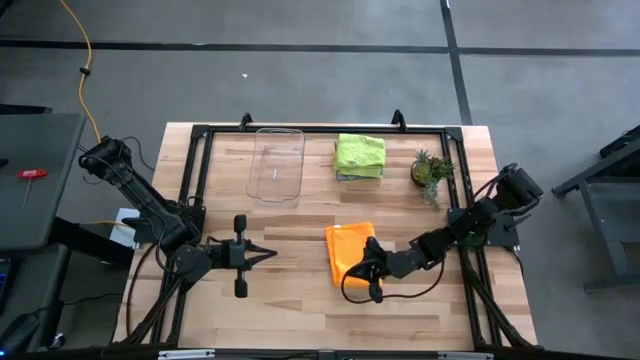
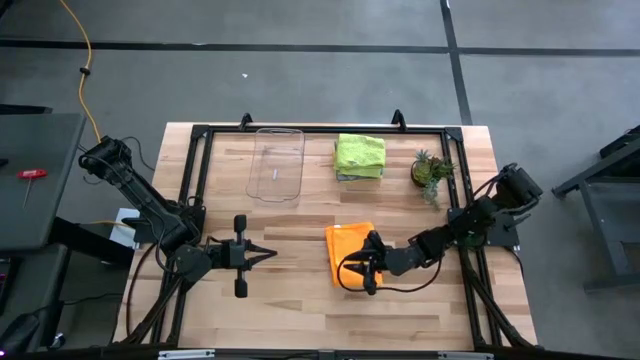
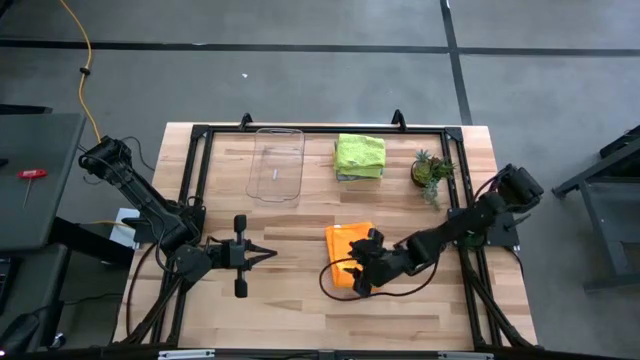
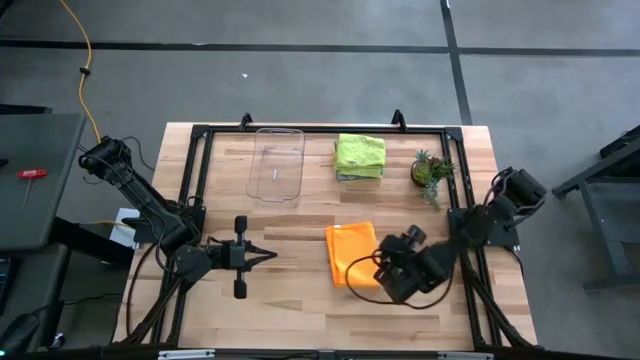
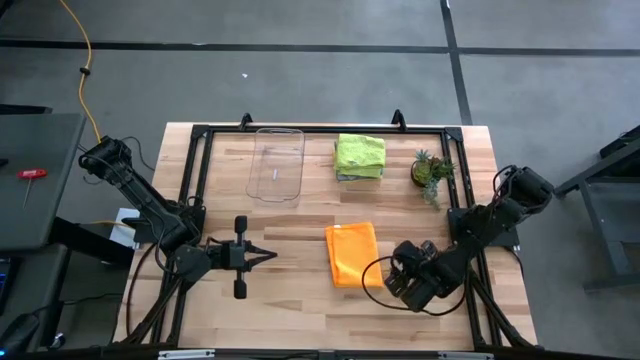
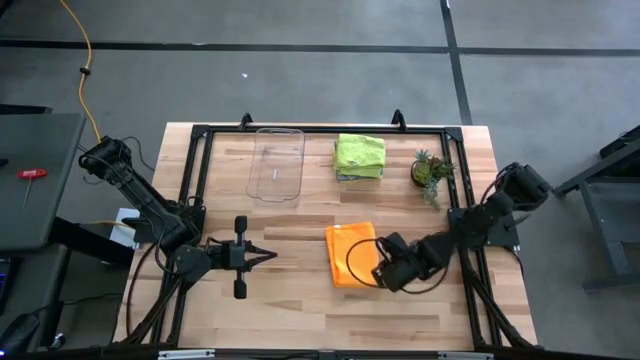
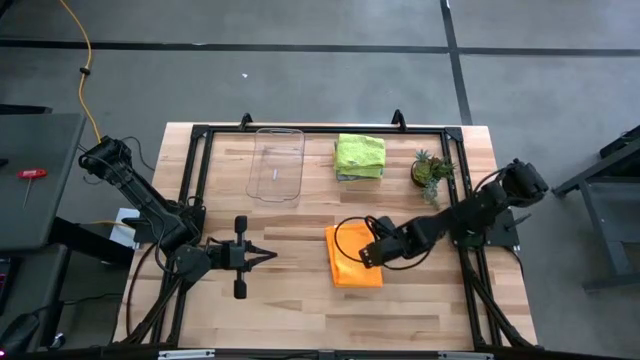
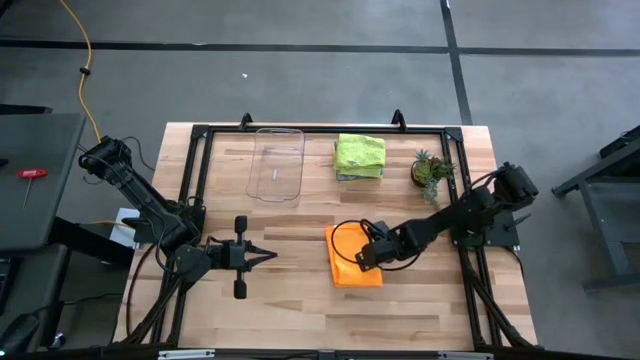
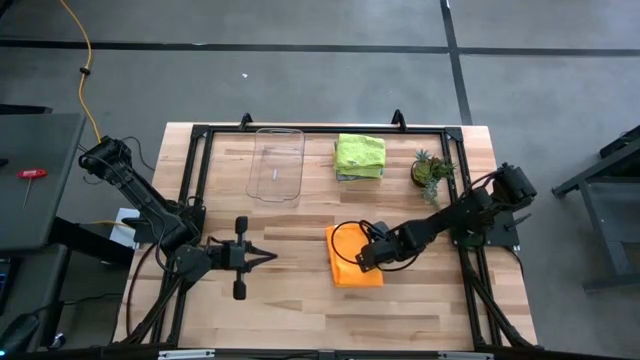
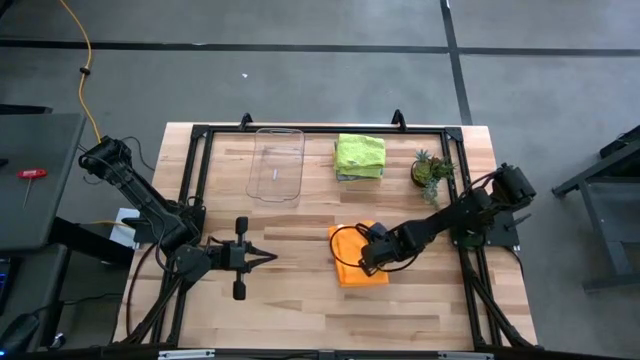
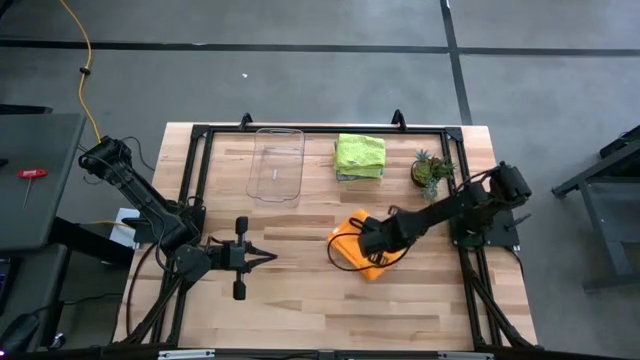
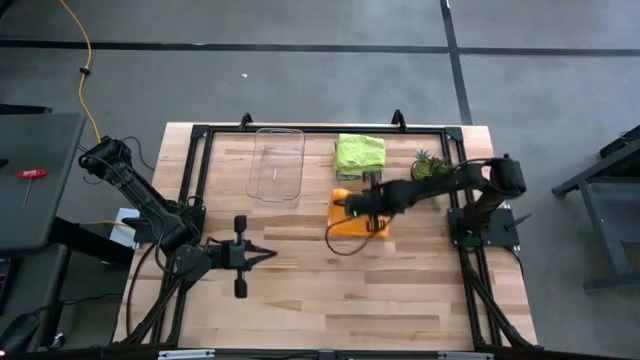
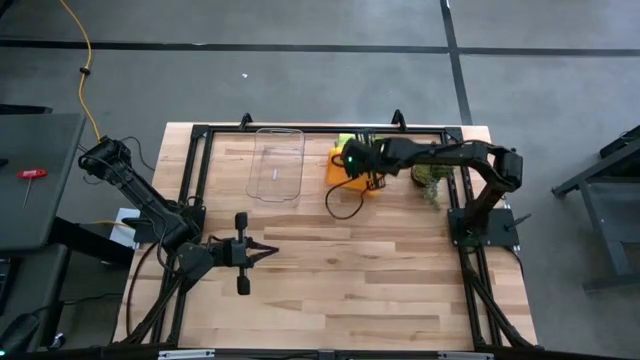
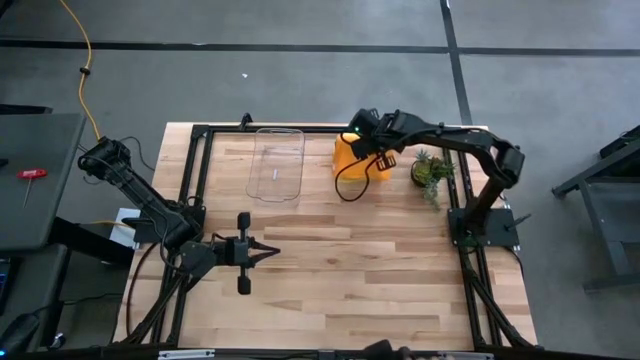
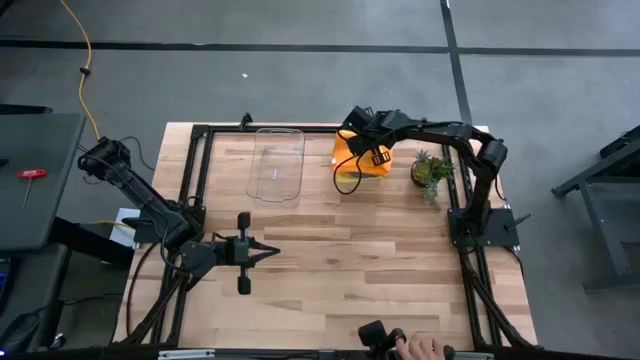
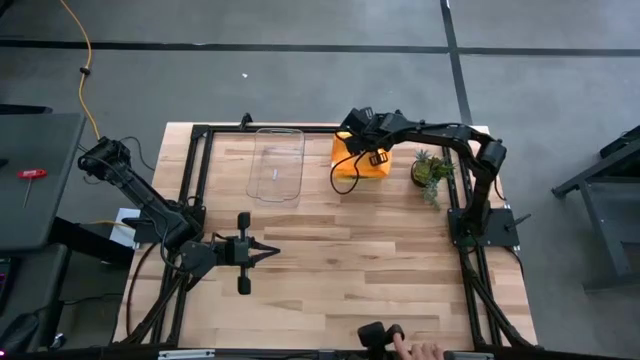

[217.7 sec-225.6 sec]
Task: Fold microfiber towels
Stack the orange microfiber cloth on the green microfiber cloth

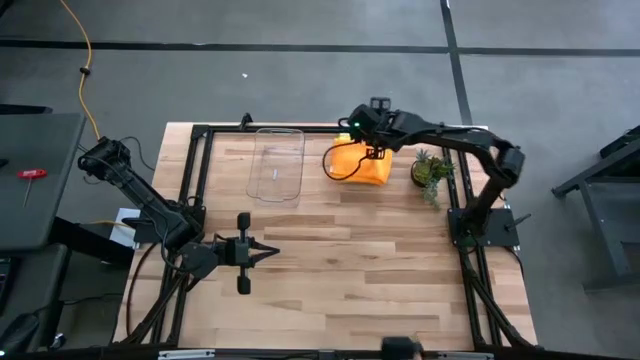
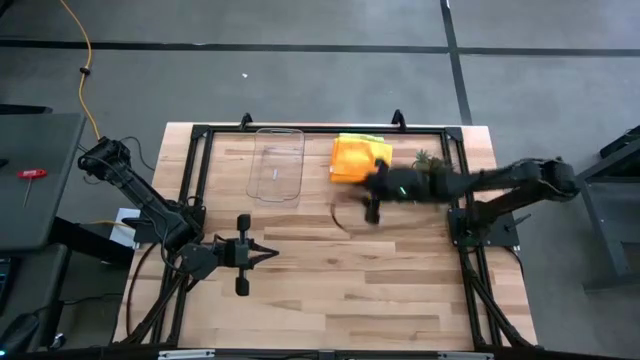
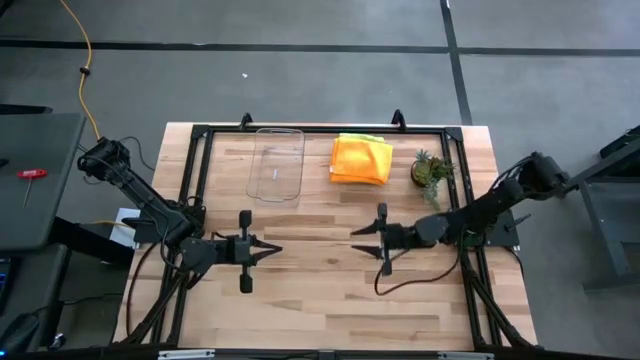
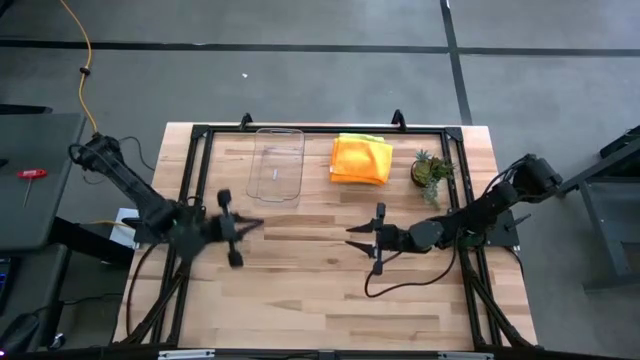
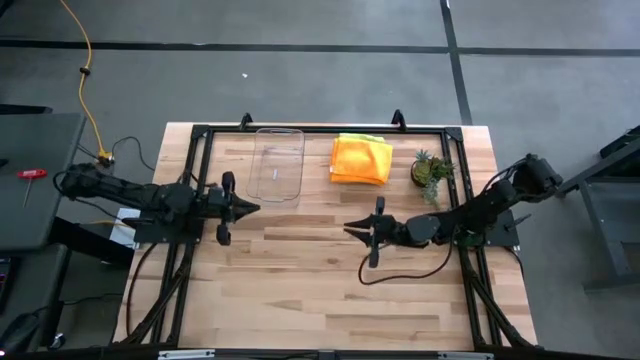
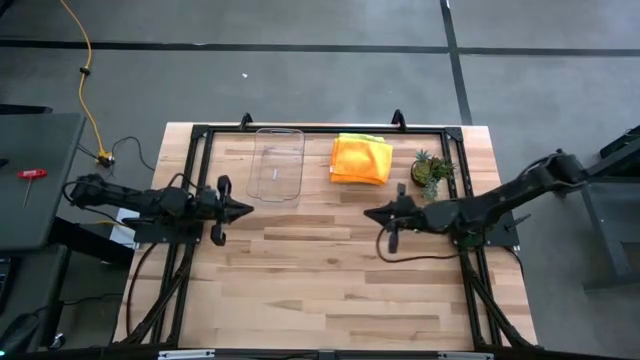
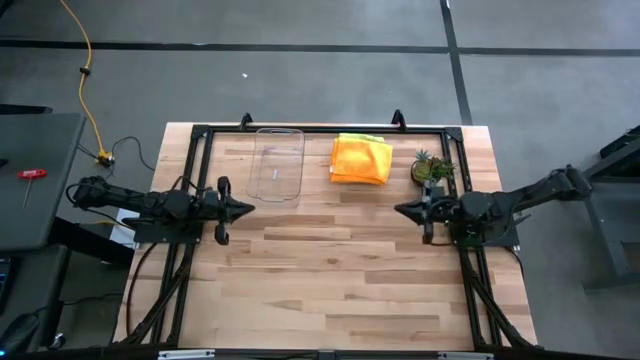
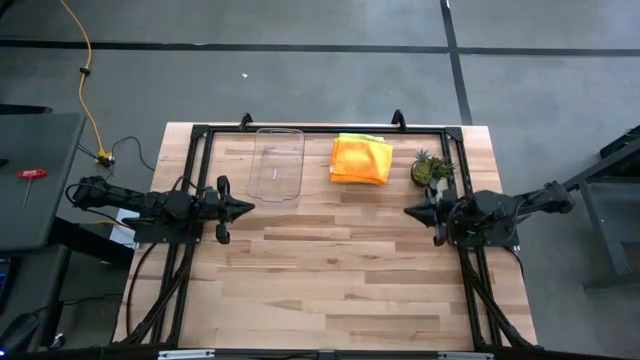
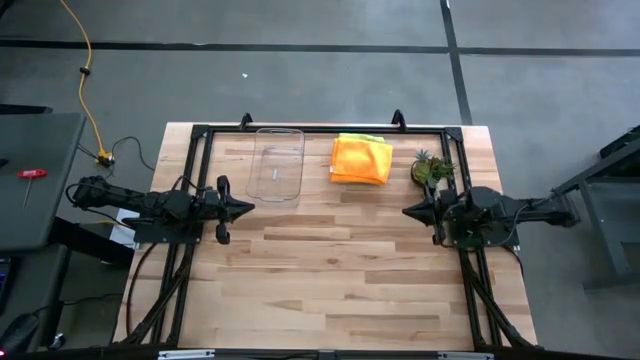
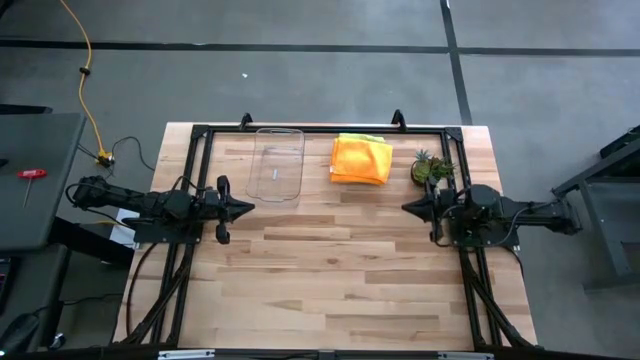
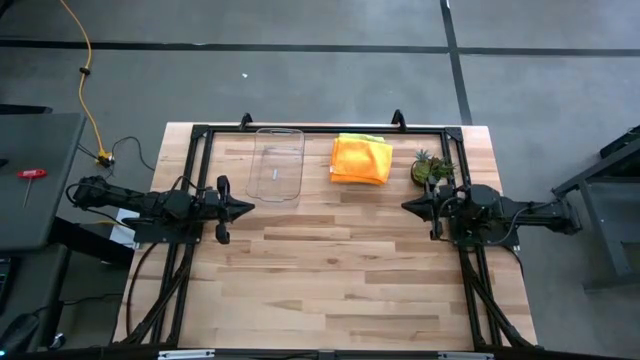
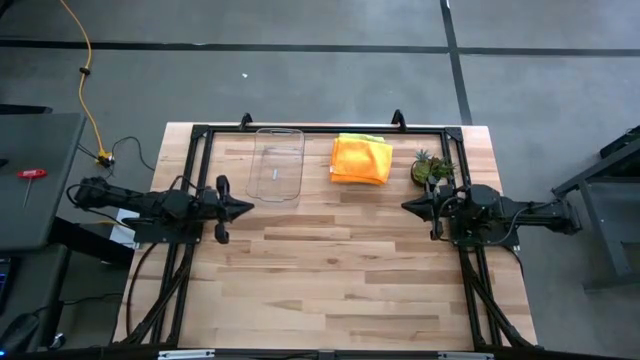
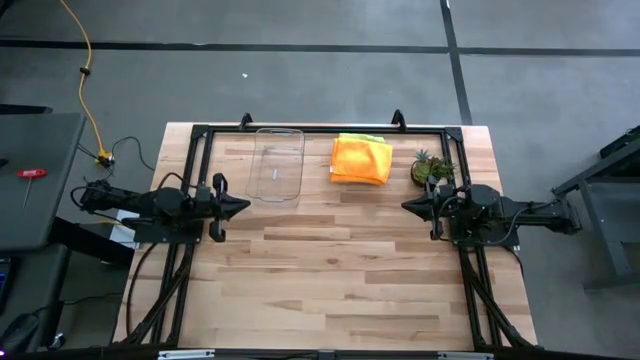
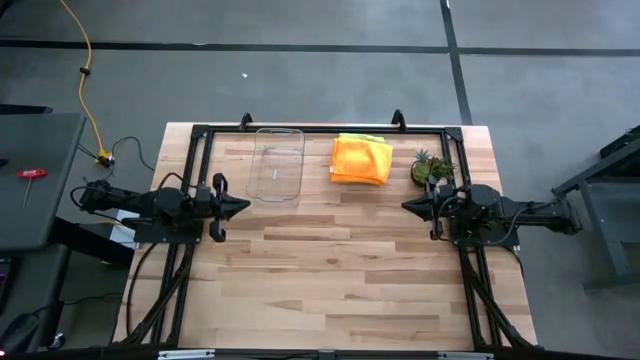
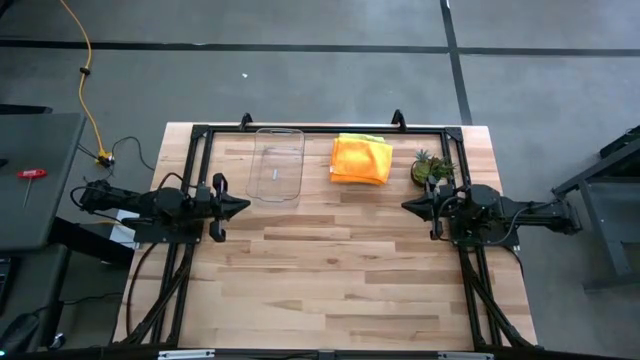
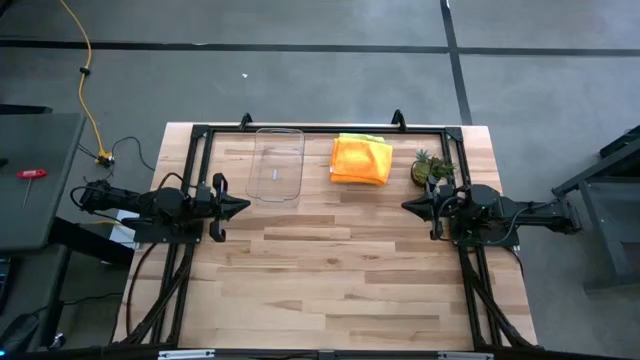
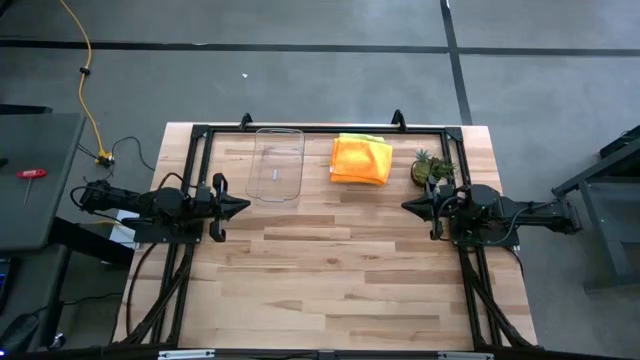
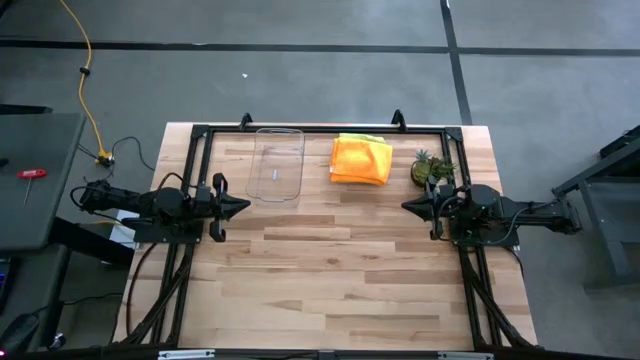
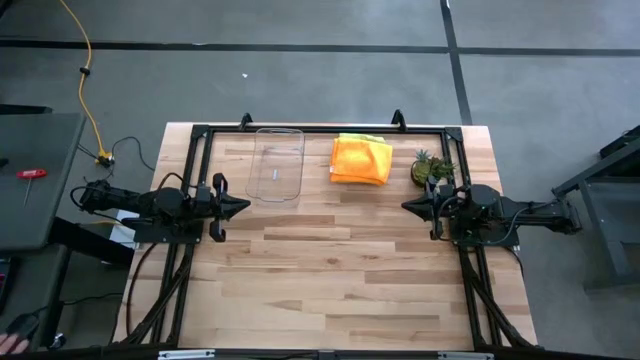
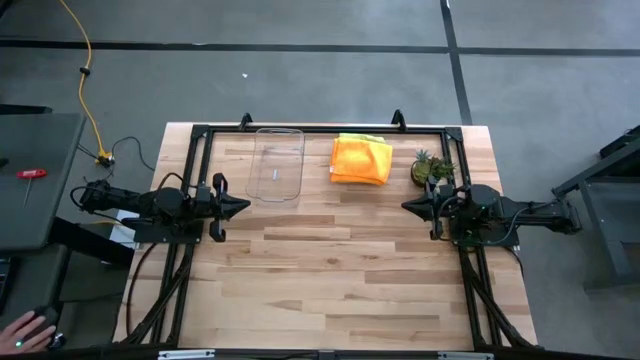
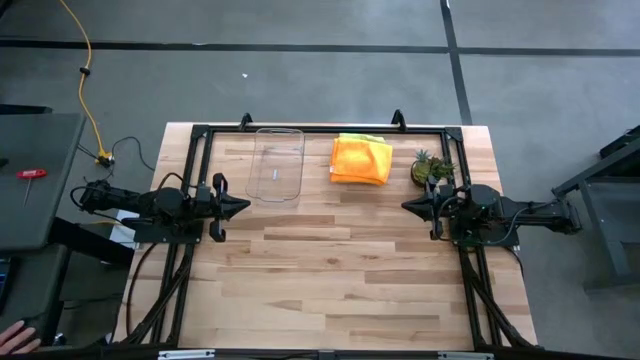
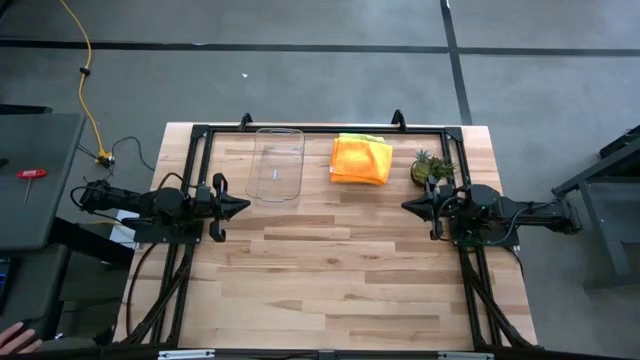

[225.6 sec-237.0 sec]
Return to Home Position

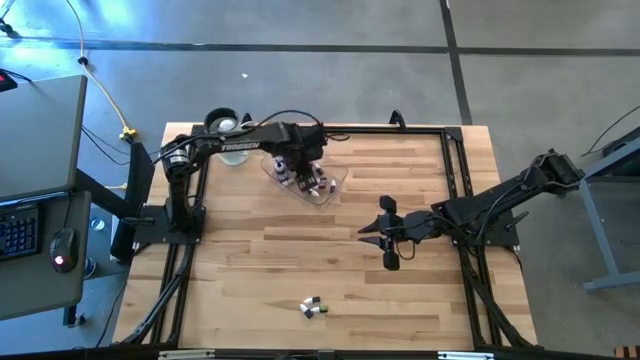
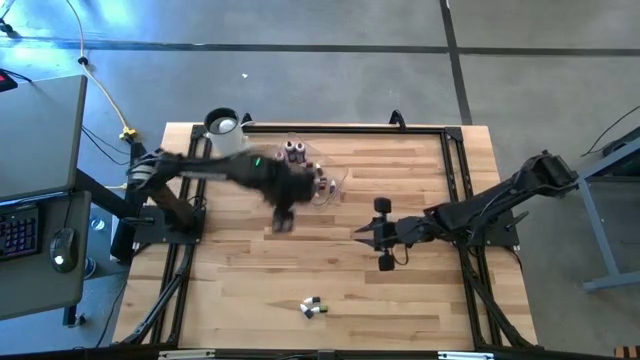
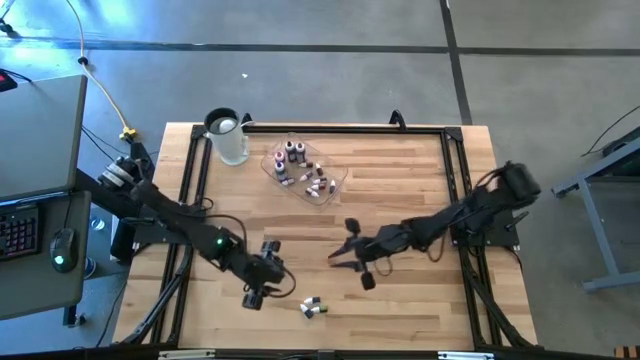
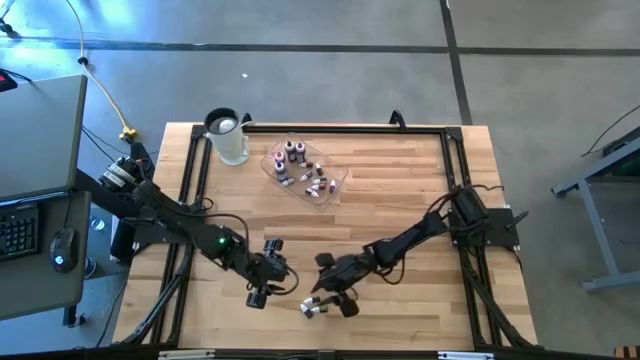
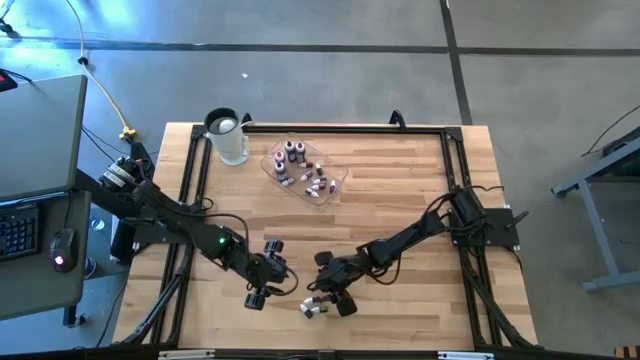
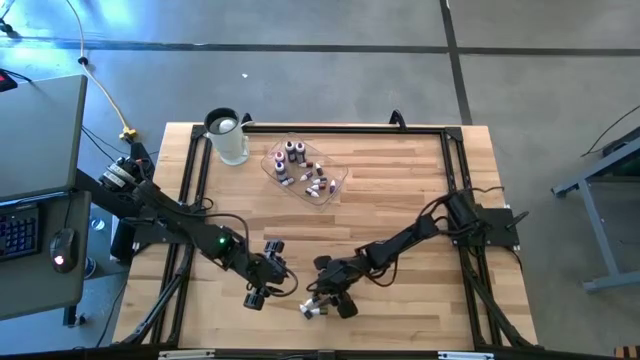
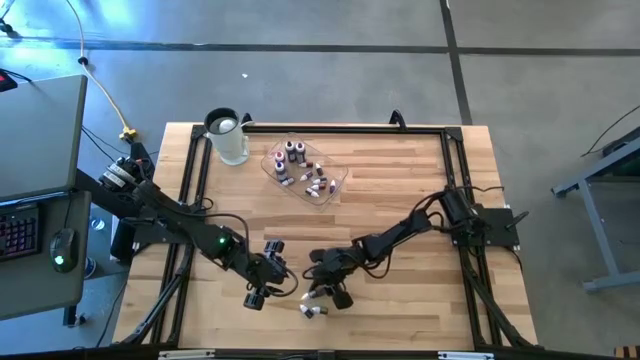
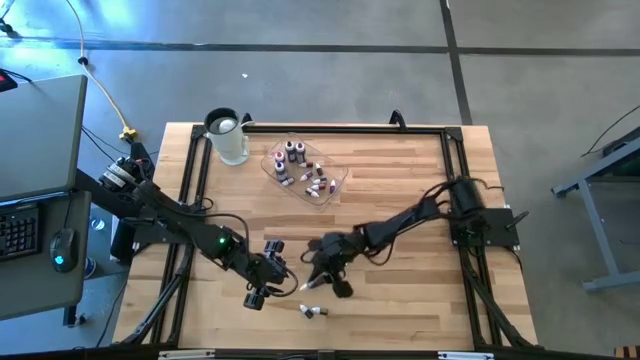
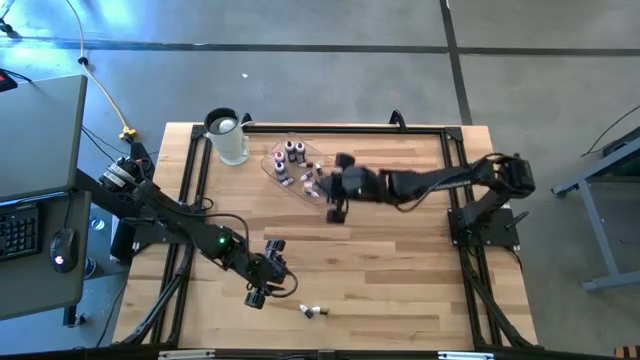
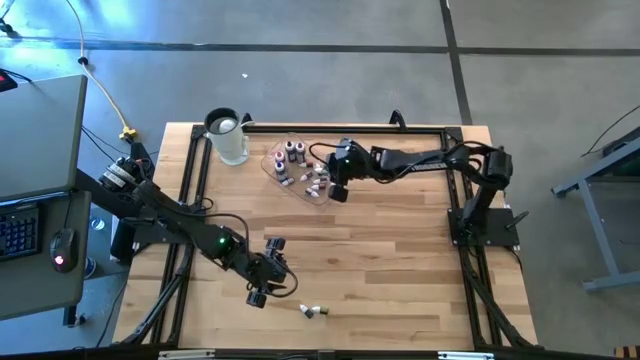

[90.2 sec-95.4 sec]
Task: Pick & Place food coloring
Put the top small green food coloring bottle into the bin
